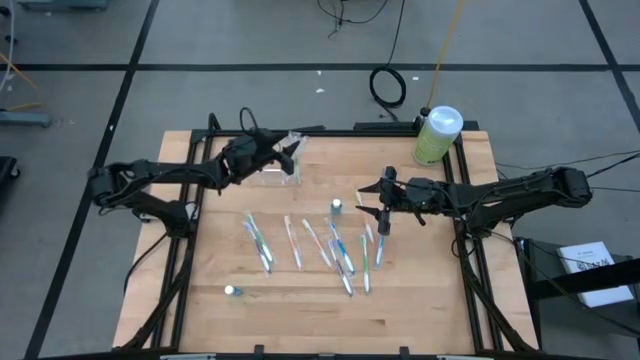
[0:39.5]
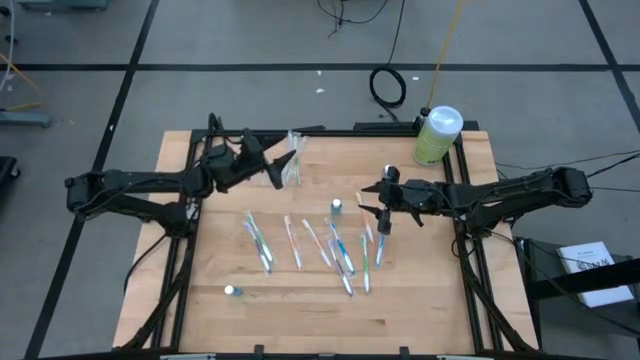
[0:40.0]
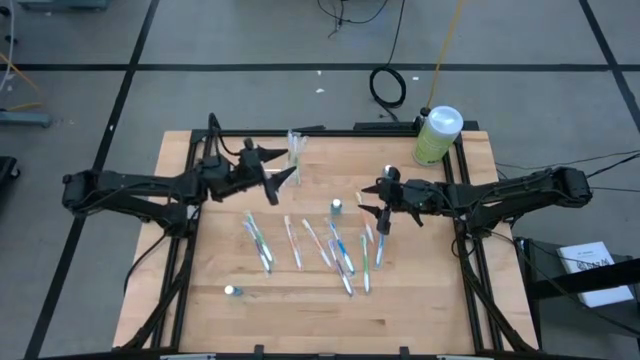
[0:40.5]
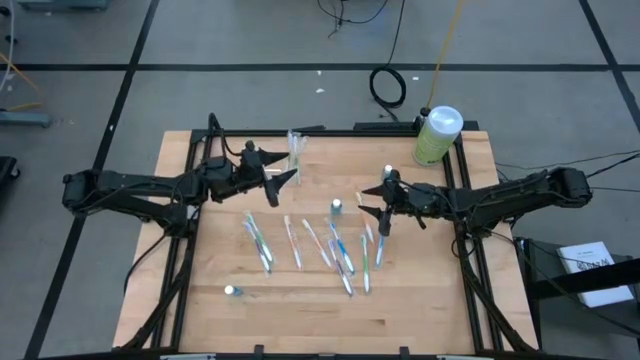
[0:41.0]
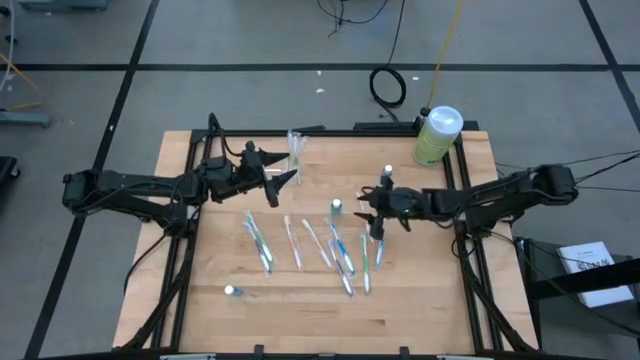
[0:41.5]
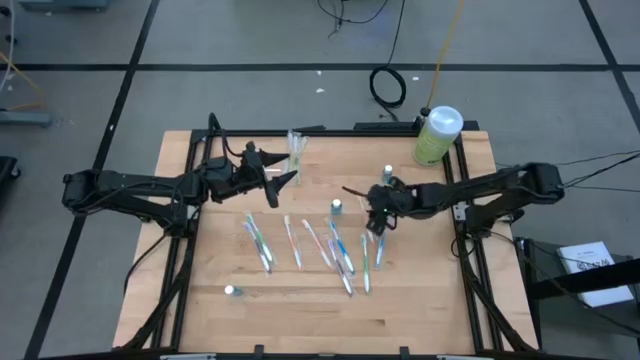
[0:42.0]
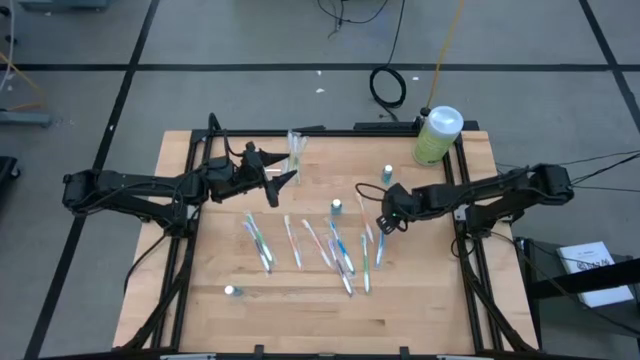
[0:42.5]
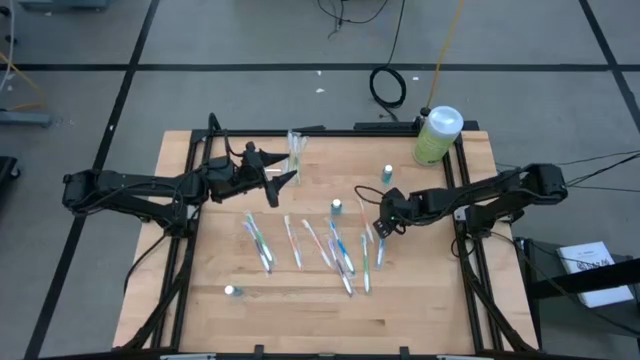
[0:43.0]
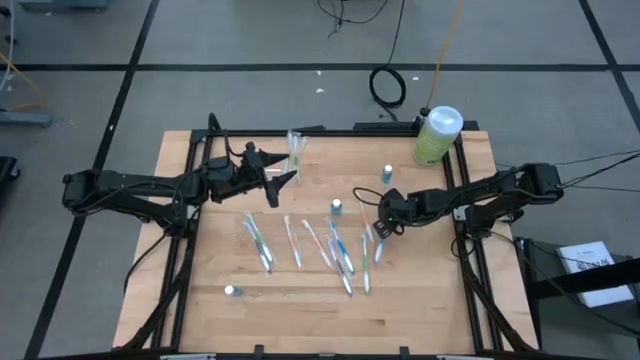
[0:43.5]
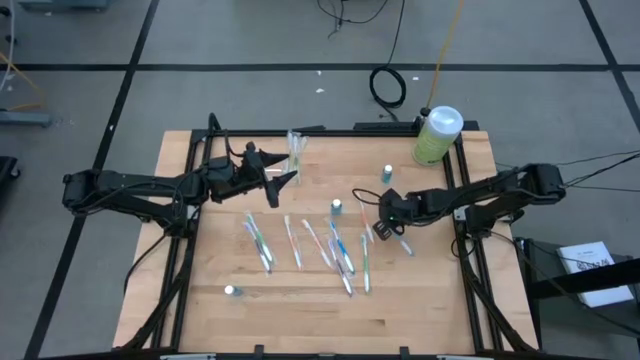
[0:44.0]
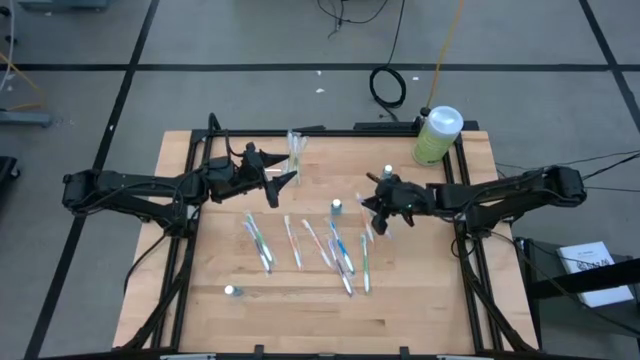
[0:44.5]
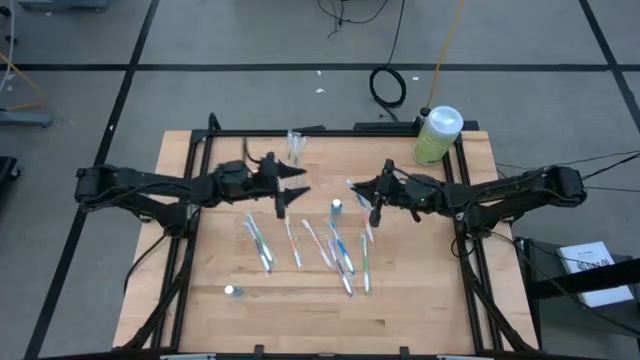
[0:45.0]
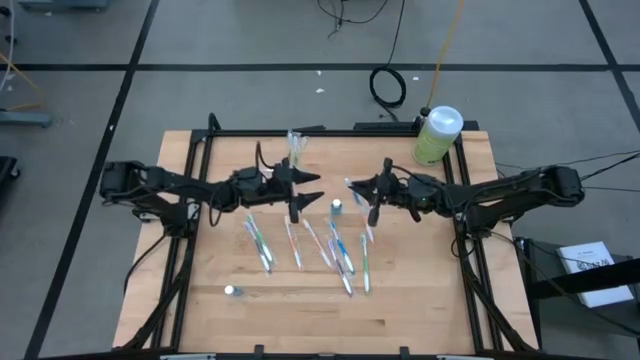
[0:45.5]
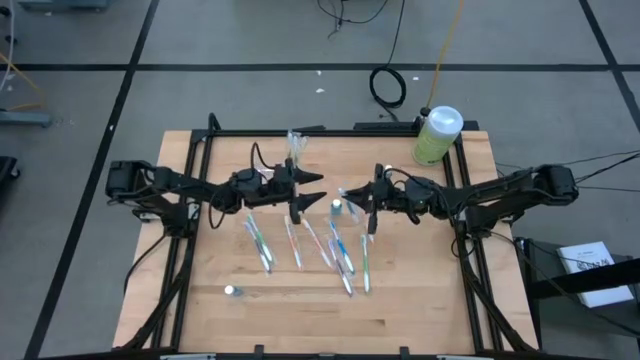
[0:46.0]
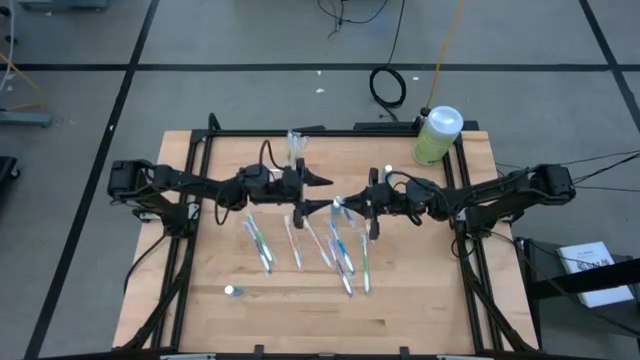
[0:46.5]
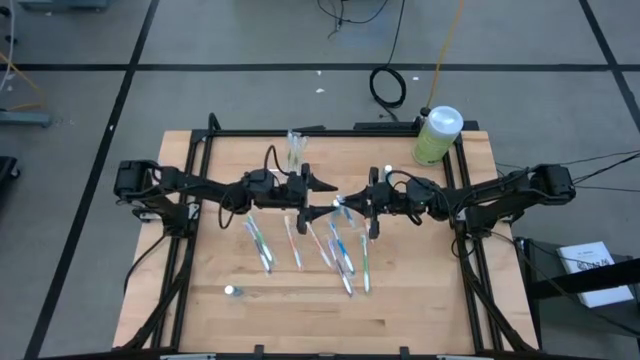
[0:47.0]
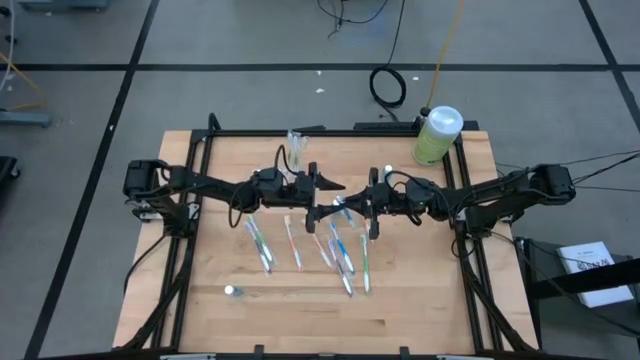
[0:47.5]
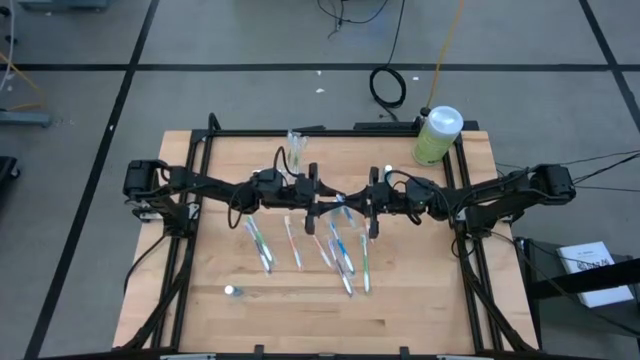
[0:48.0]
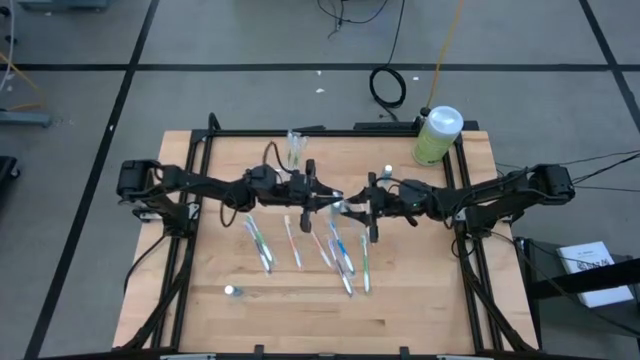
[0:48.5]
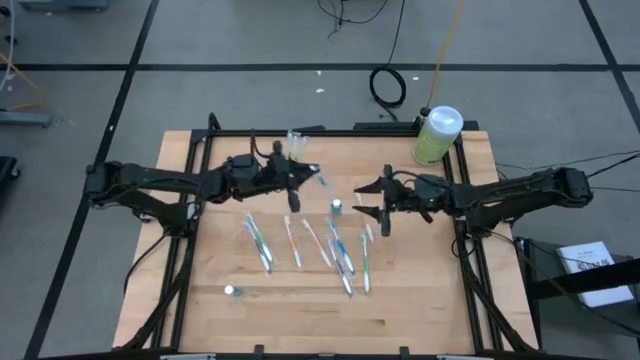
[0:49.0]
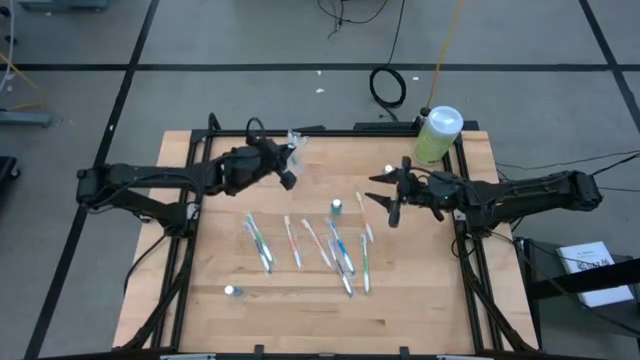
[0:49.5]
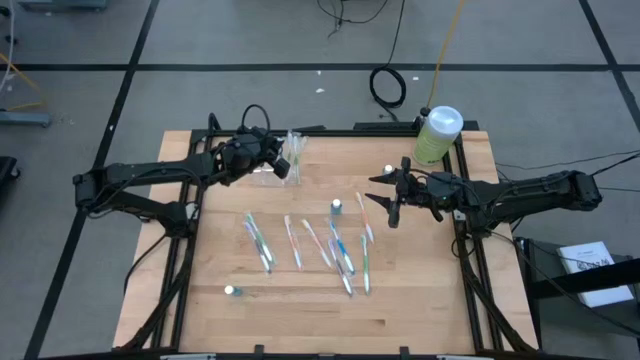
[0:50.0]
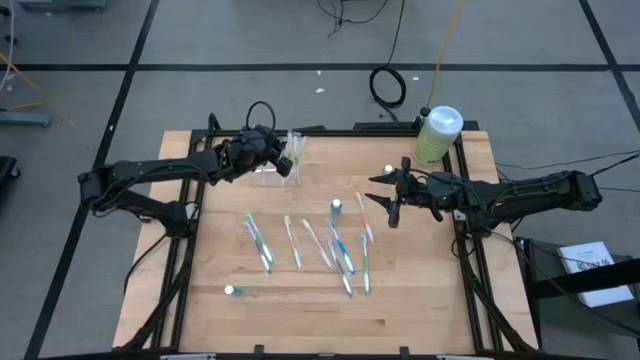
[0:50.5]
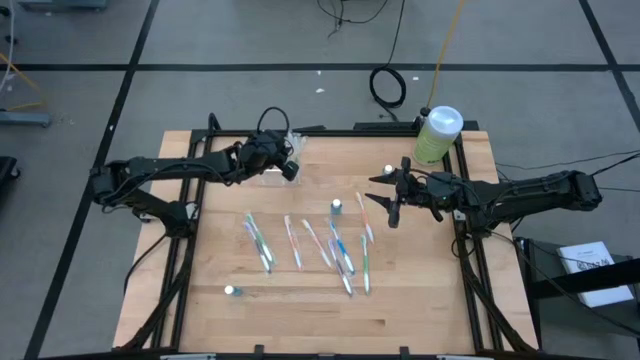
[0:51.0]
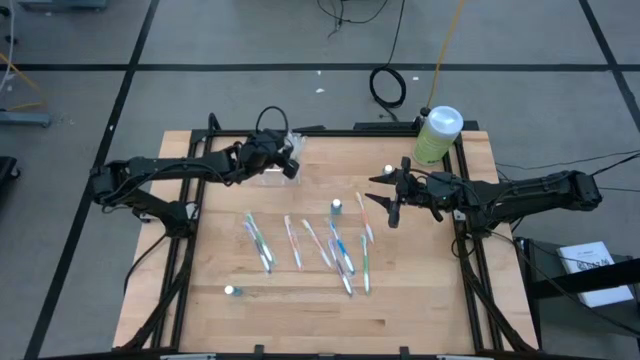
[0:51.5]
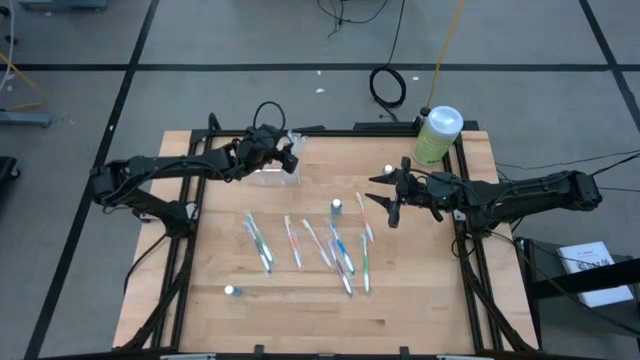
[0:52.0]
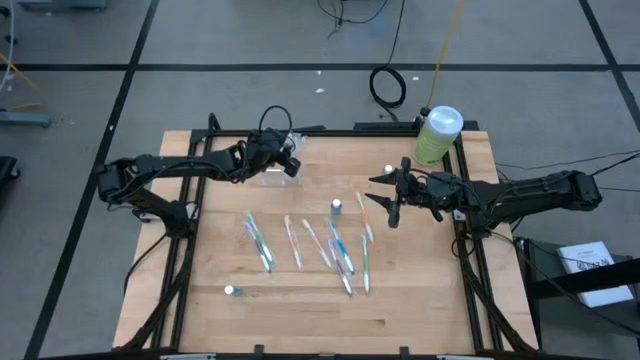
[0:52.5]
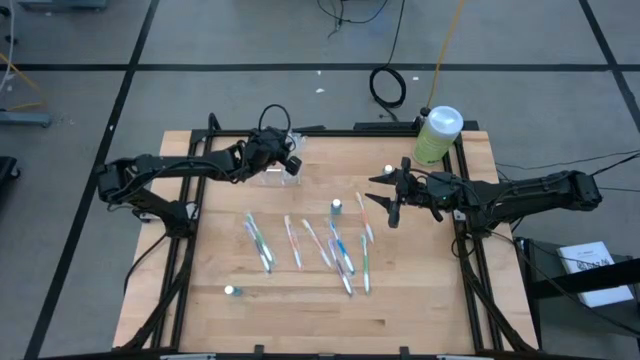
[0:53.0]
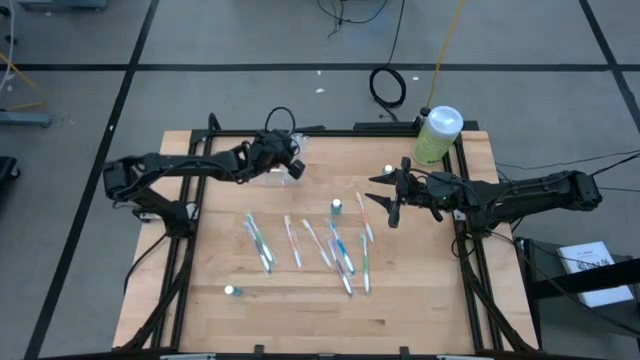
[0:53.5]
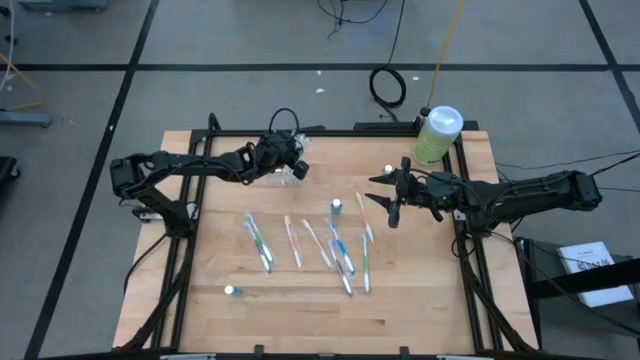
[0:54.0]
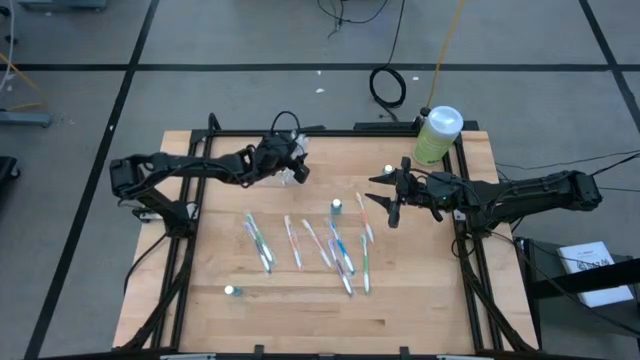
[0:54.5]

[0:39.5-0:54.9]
Task: Pick & Place toothbrushing station
Put the blue toothbrush into the transparent organizer

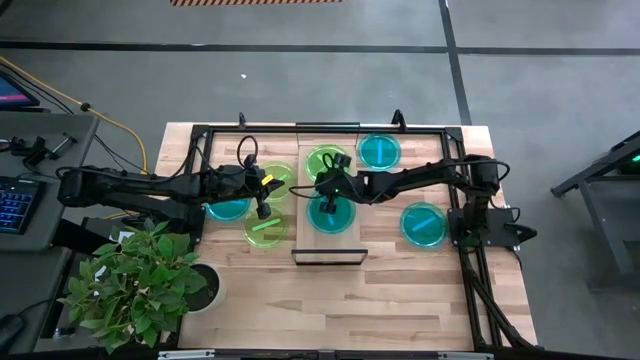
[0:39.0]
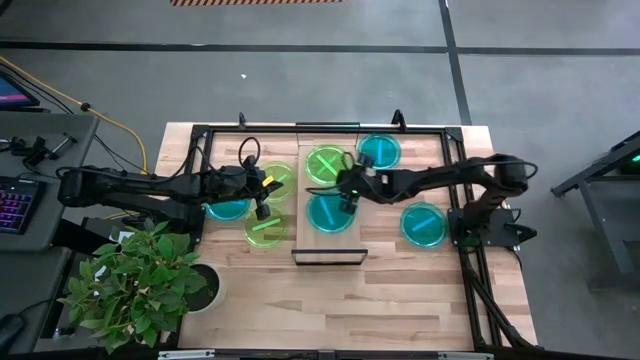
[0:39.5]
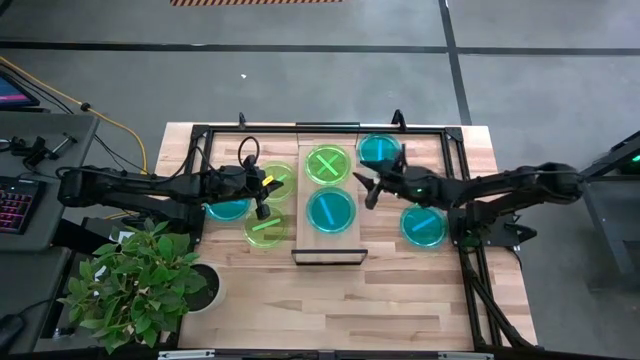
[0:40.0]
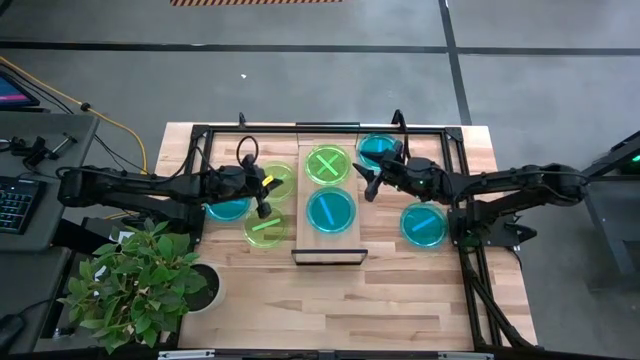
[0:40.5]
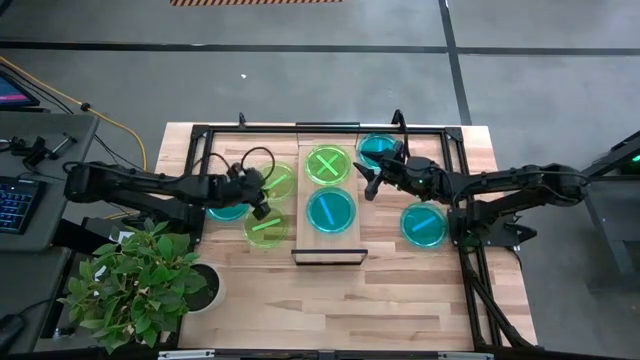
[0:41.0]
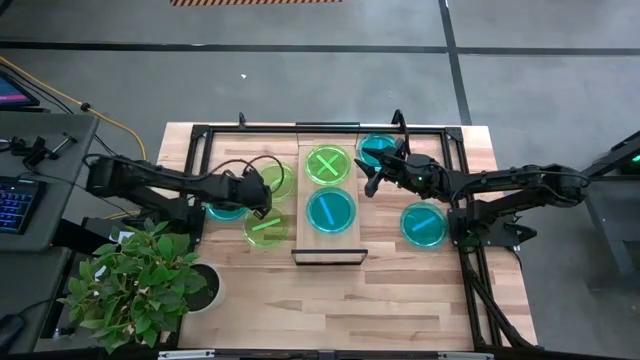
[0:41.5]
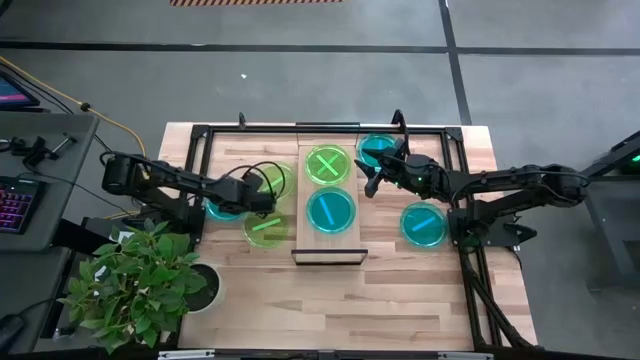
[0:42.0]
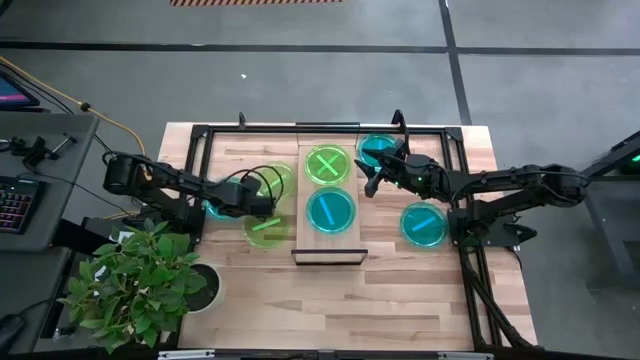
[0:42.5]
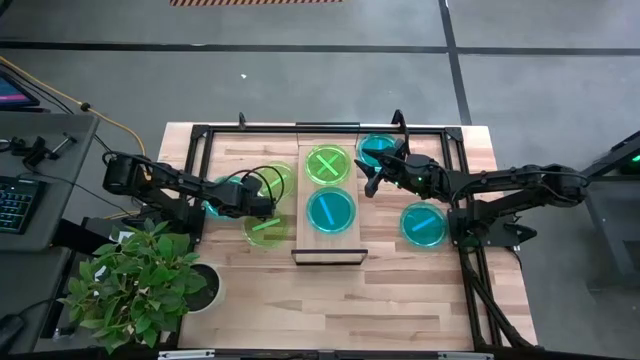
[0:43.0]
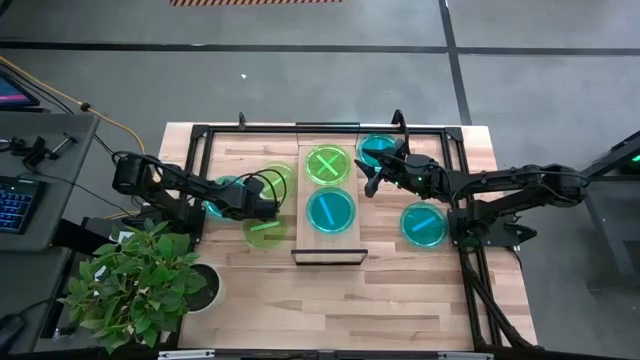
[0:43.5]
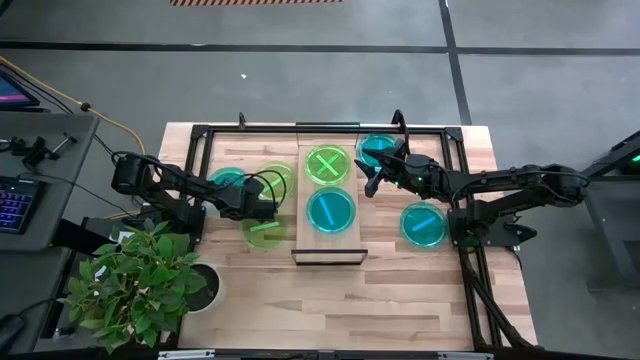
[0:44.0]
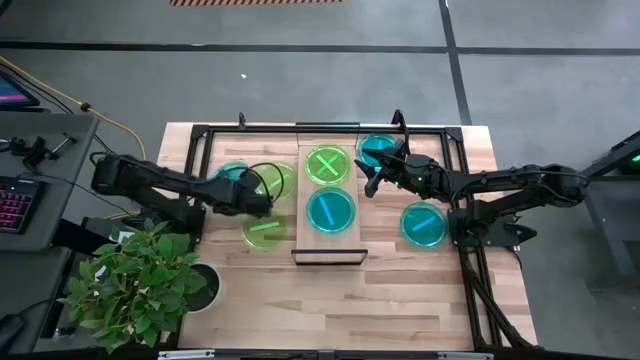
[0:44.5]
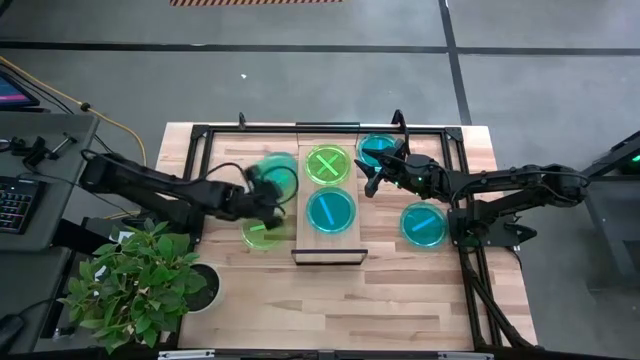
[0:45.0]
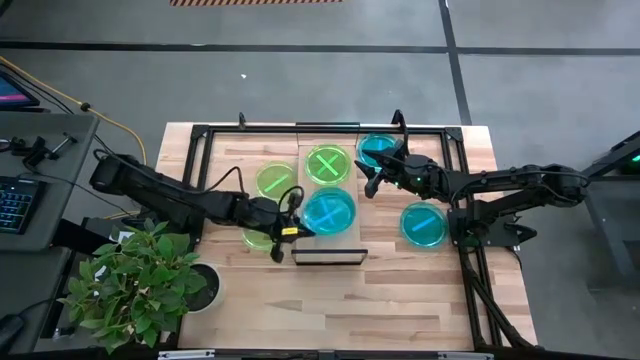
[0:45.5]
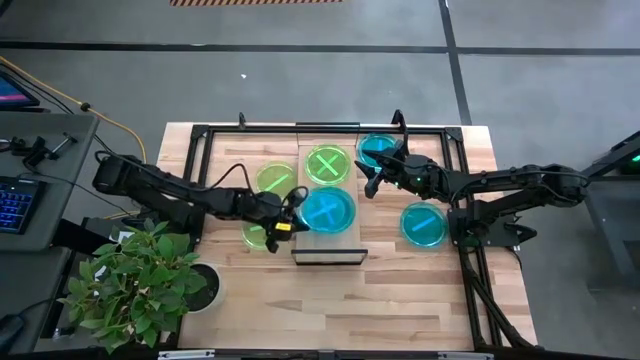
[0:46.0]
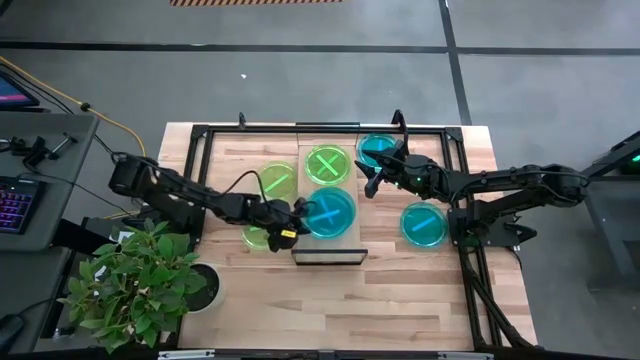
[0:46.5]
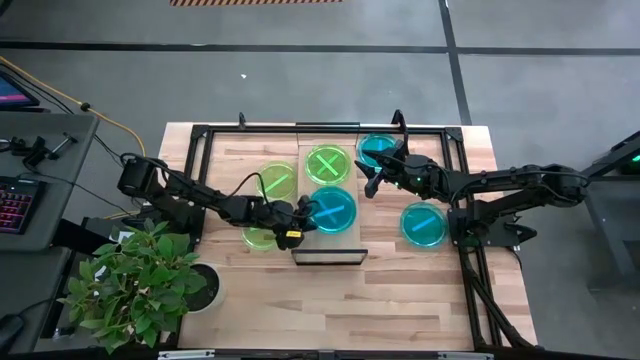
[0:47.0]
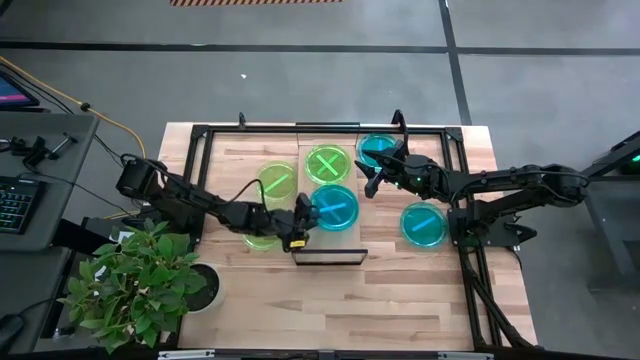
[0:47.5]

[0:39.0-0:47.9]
Task: Place and stack plates onto a shelf
Stack the middle blue plate on top of the blue plate on the shelf
